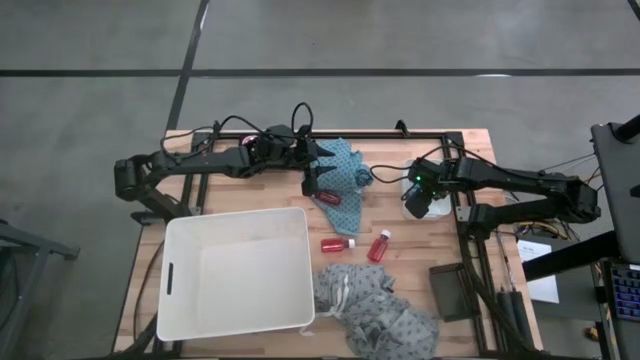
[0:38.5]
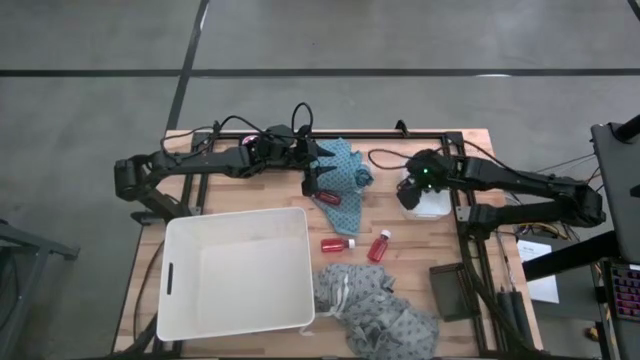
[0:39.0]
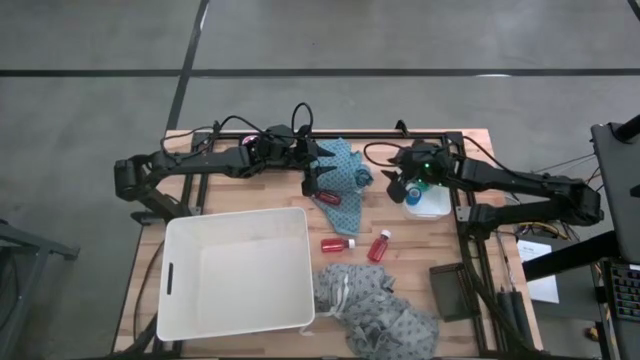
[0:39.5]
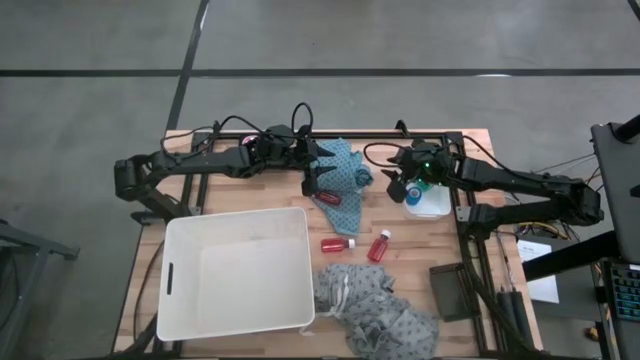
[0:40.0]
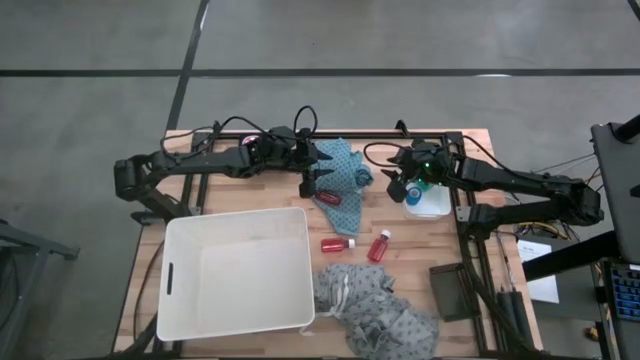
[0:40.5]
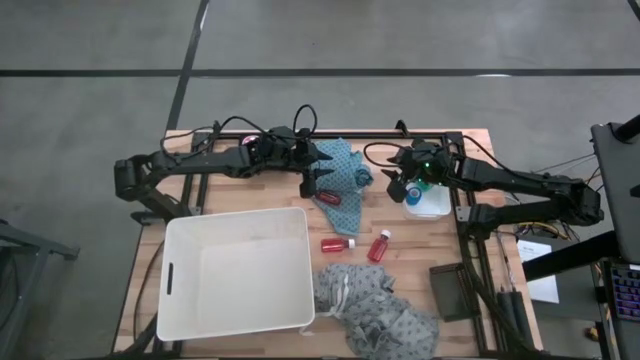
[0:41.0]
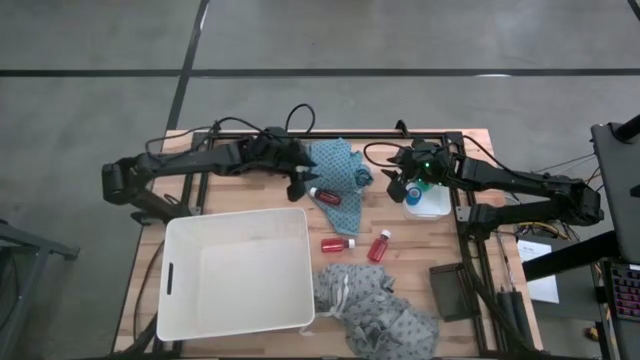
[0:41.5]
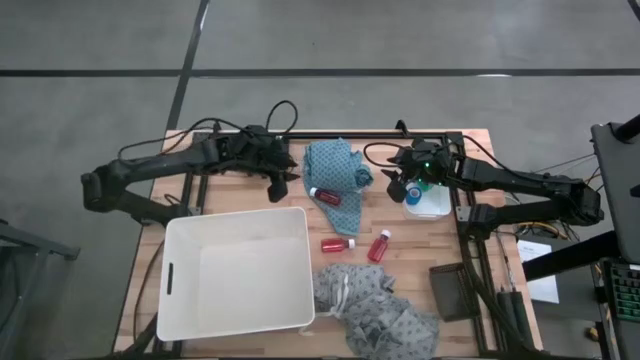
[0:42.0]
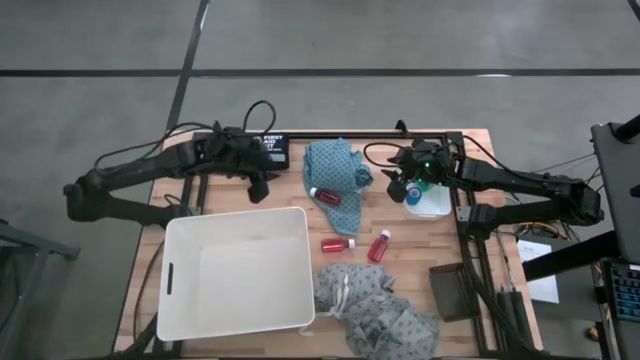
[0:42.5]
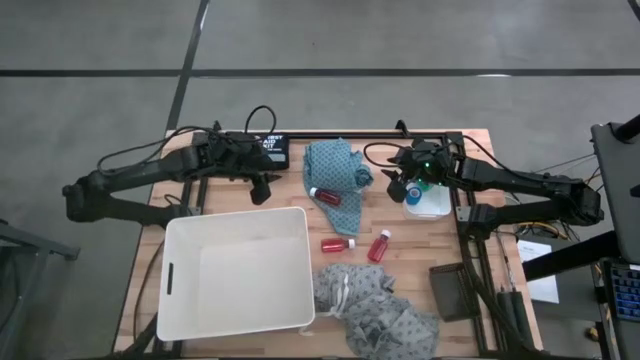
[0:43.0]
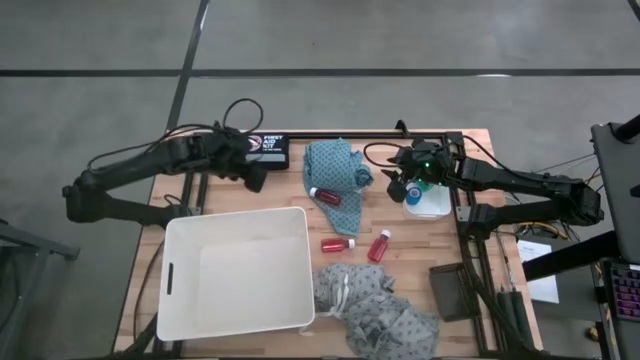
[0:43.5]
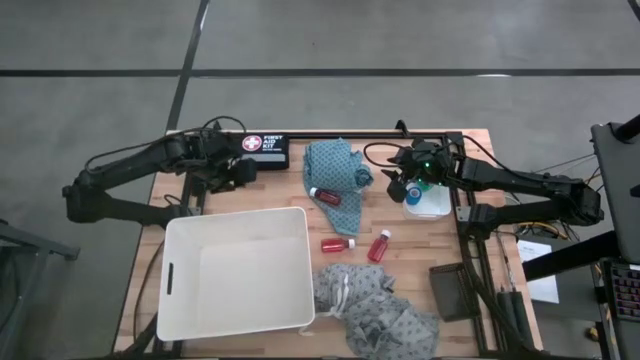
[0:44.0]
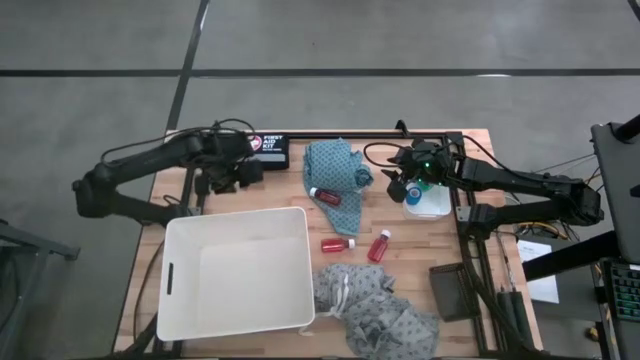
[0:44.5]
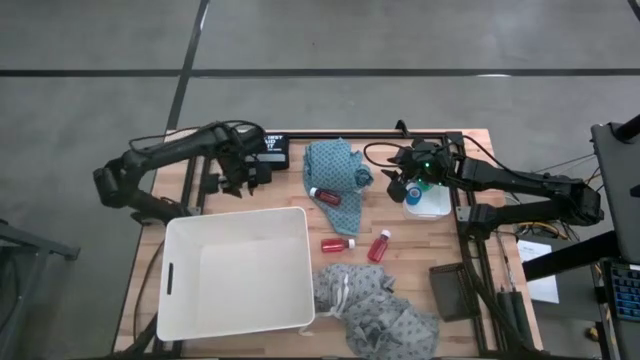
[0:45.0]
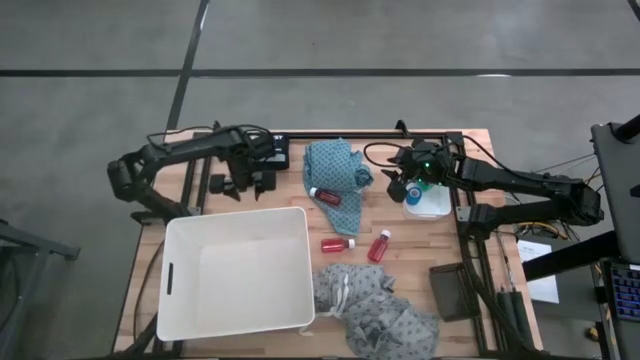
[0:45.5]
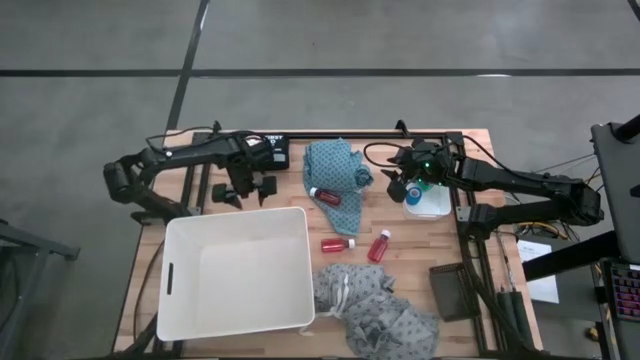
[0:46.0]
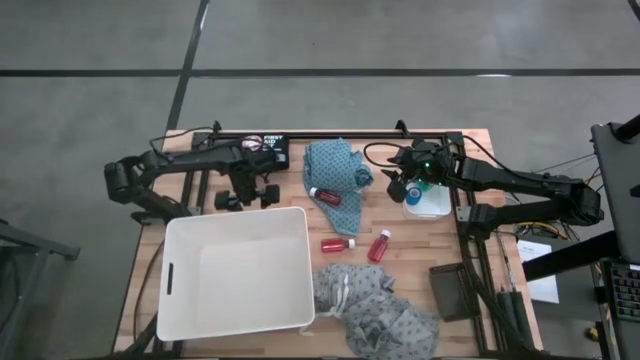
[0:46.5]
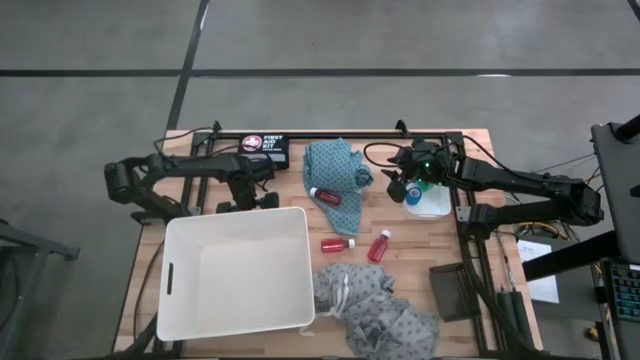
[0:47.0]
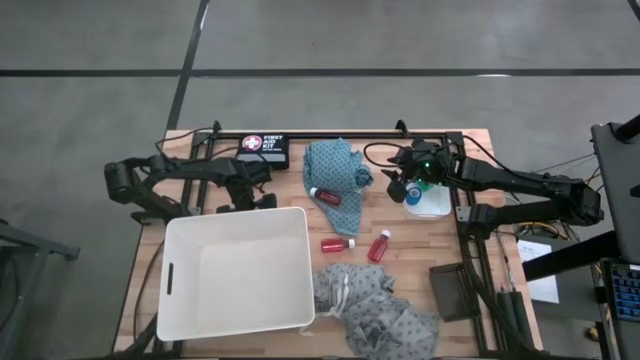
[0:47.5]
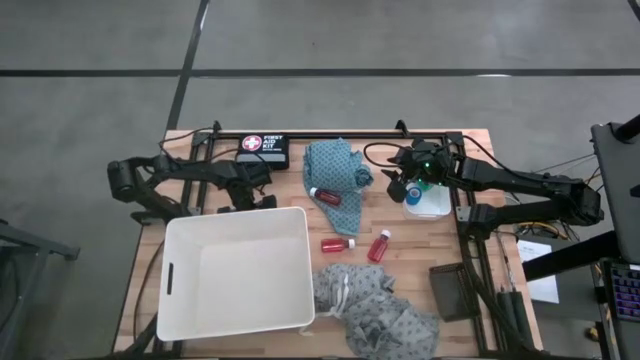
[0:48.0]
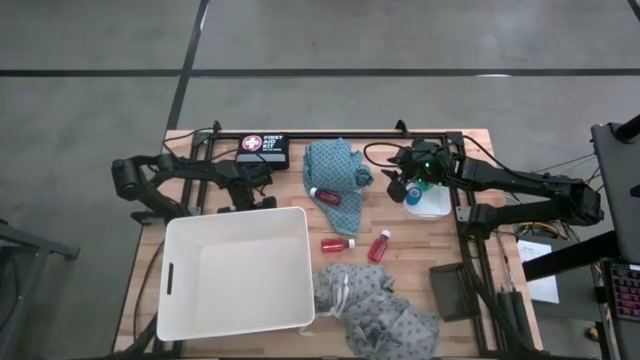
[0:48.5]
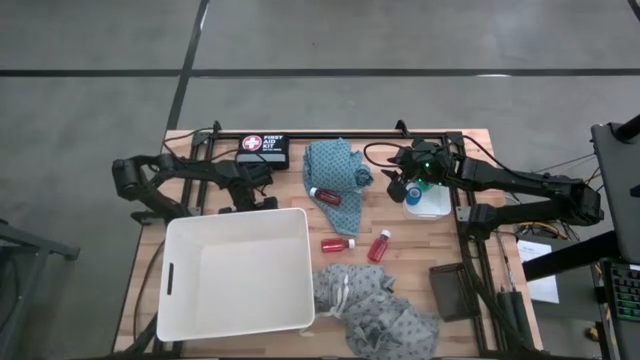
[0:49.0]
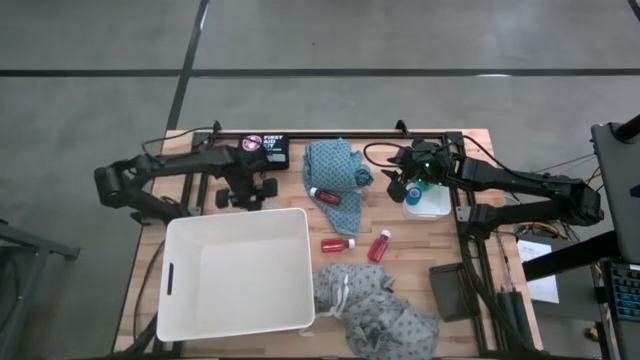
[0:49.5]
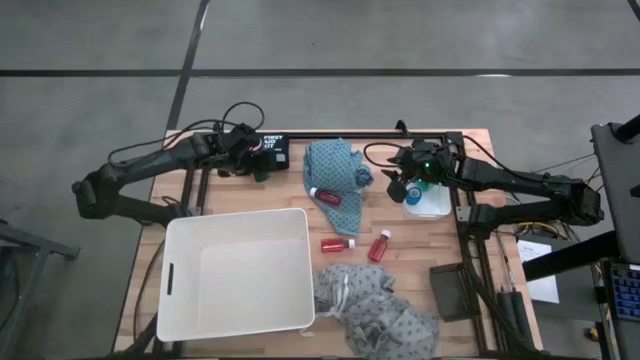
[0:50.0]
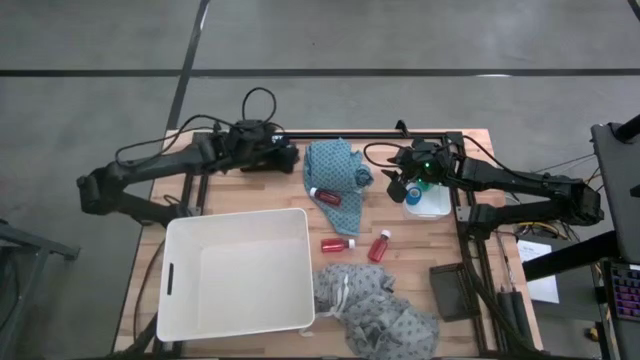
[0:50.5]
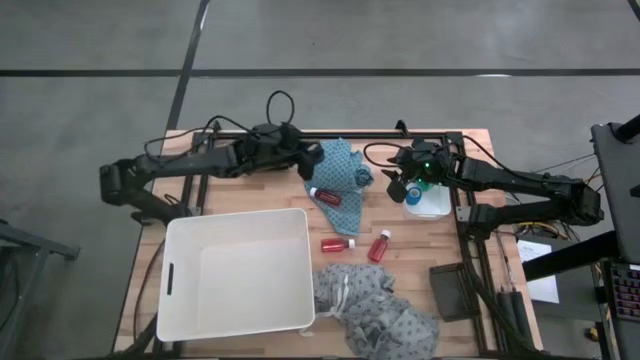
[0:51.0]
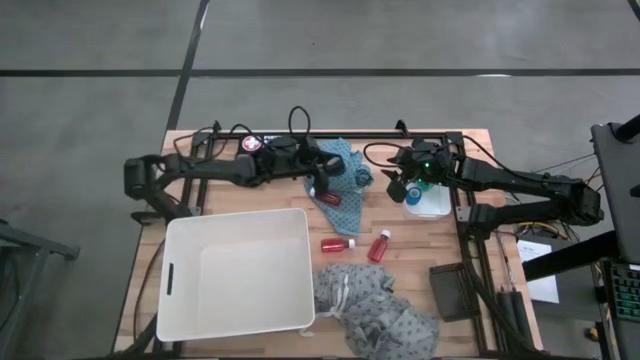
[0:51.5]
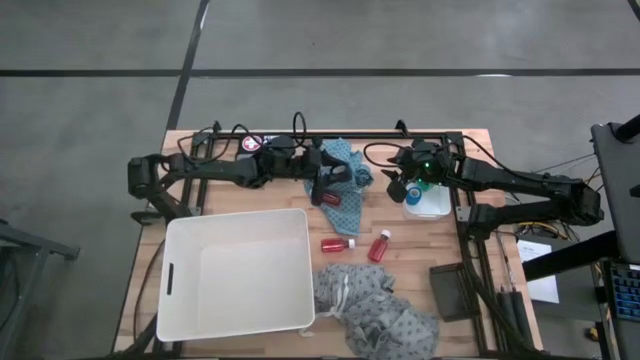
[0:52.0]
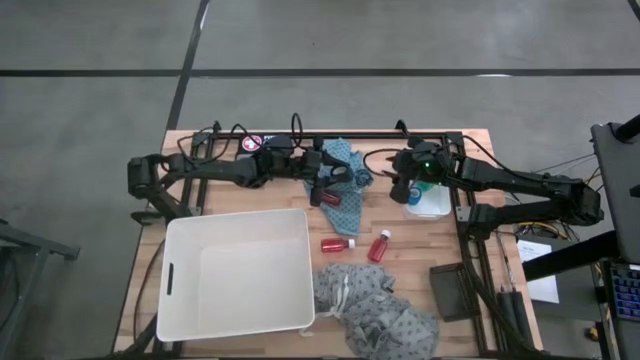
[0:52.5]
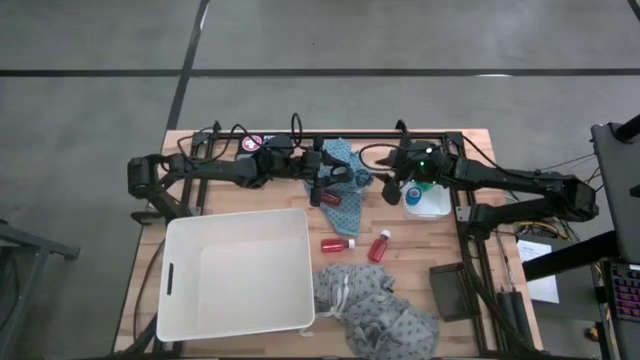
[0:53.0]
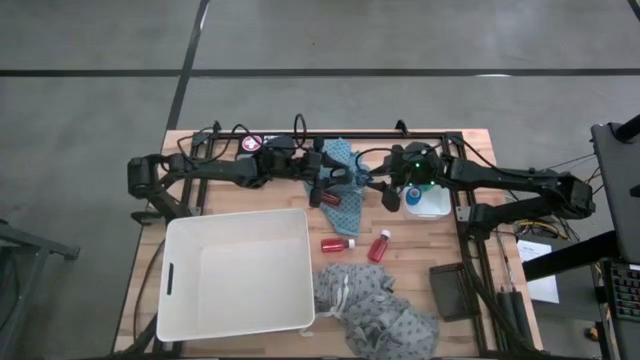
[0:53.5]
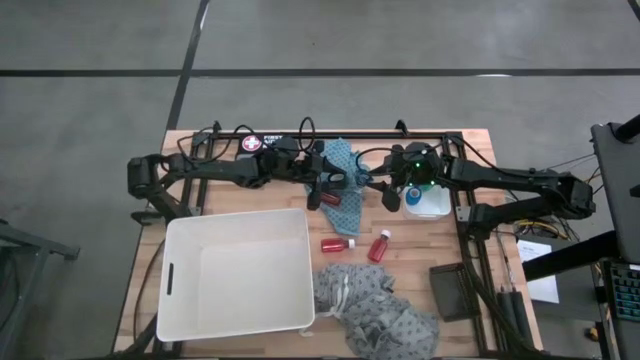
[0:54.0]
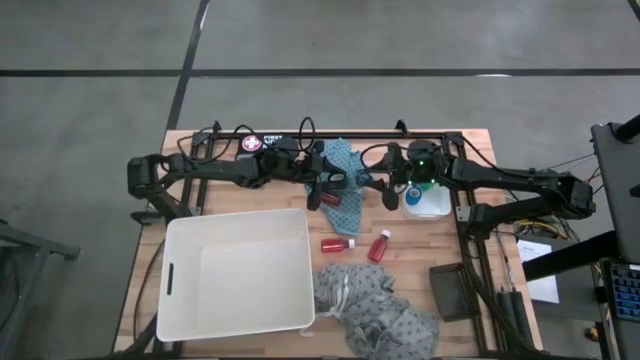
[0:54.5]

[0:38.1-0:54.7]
Task: Pick & Place Medicine items
Put the green bandage into the small white bin

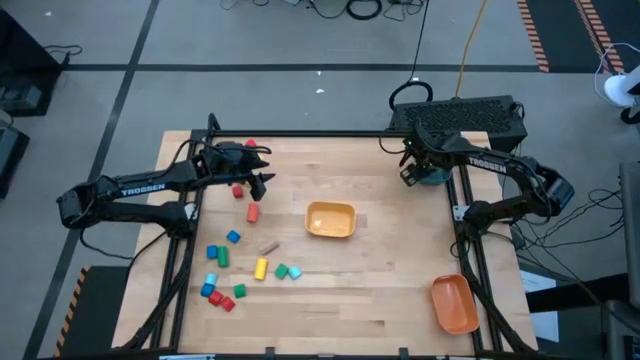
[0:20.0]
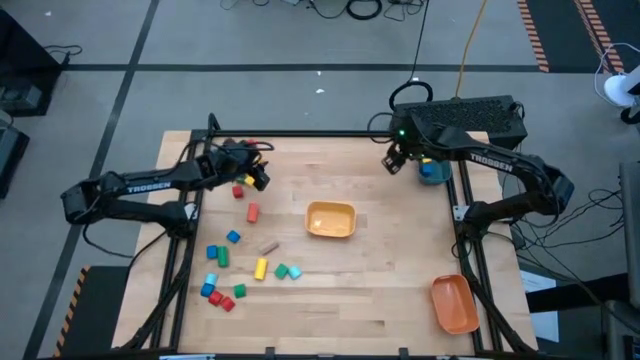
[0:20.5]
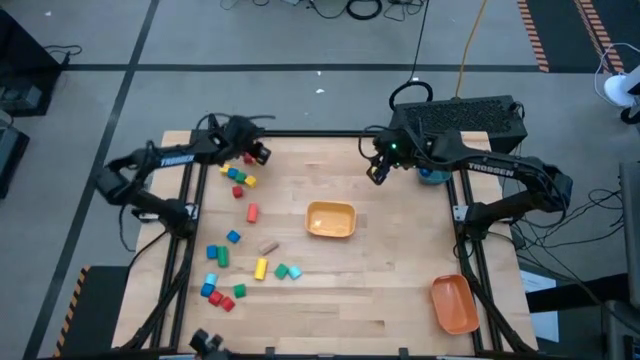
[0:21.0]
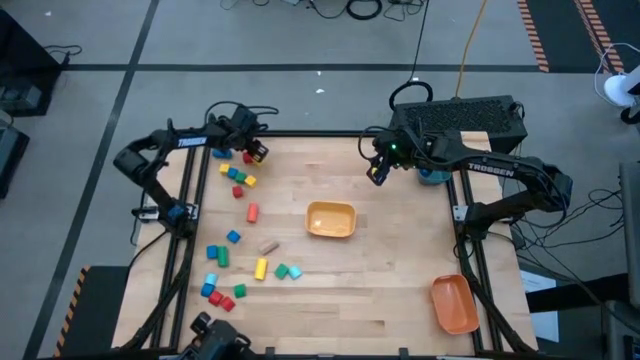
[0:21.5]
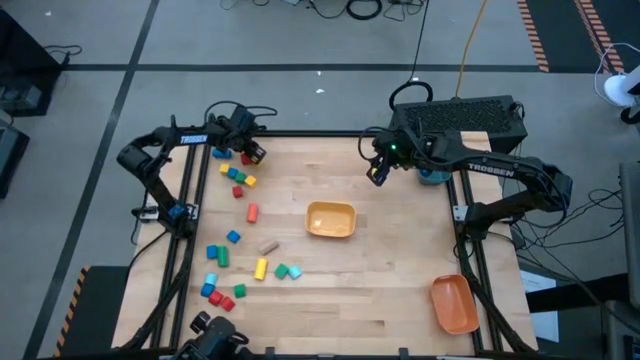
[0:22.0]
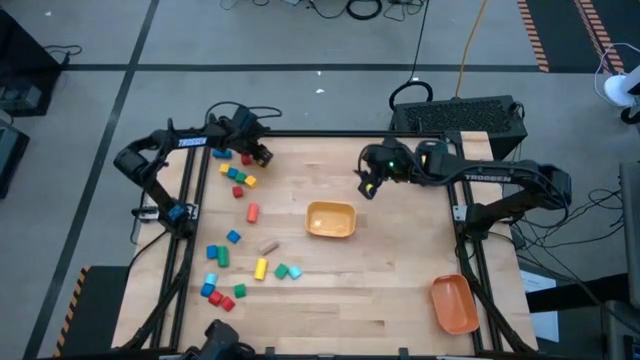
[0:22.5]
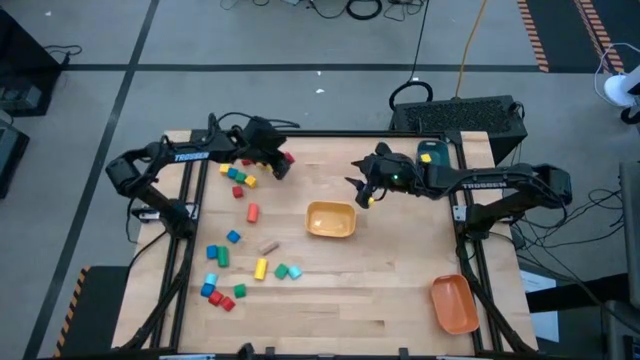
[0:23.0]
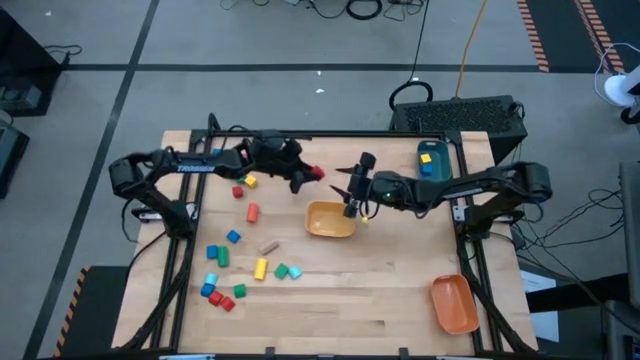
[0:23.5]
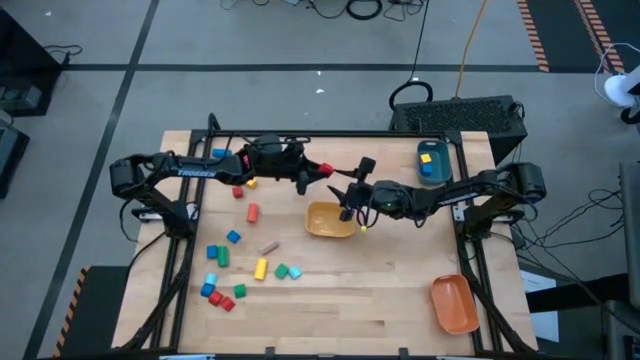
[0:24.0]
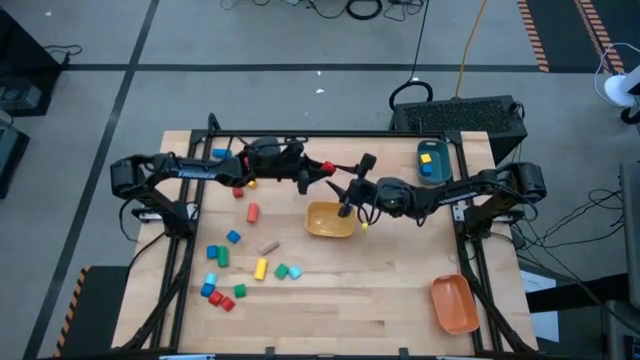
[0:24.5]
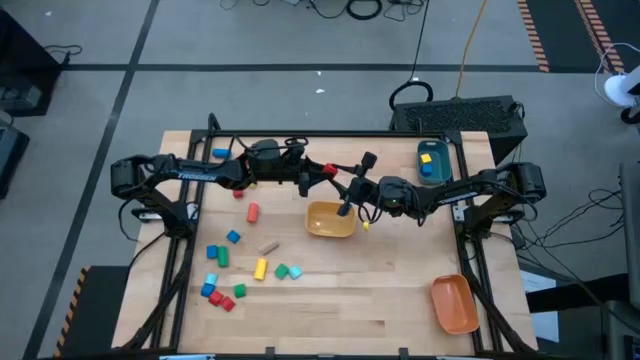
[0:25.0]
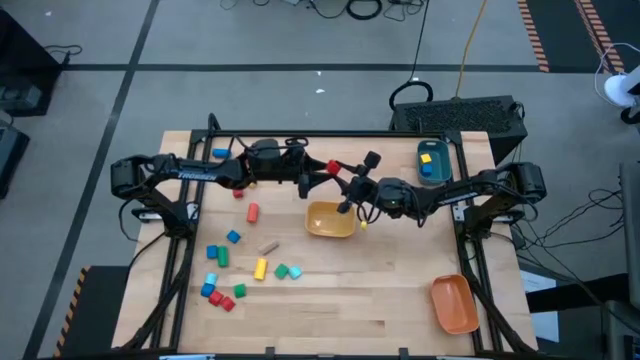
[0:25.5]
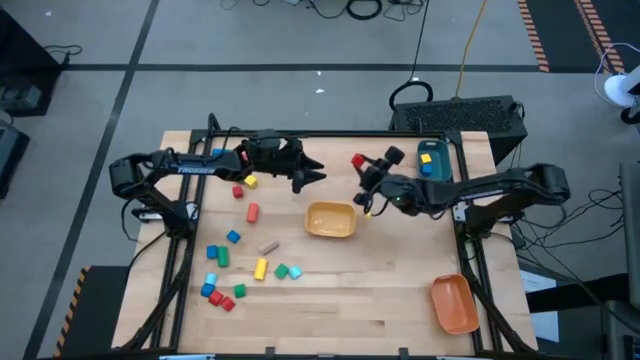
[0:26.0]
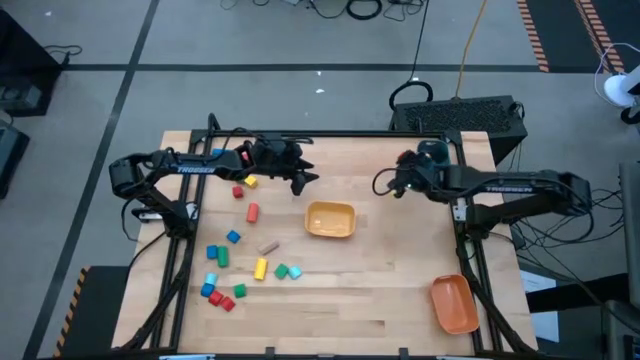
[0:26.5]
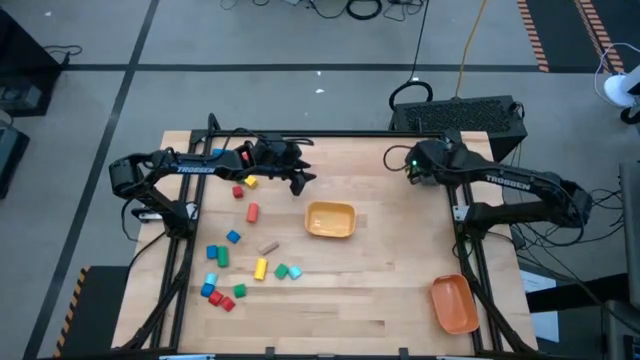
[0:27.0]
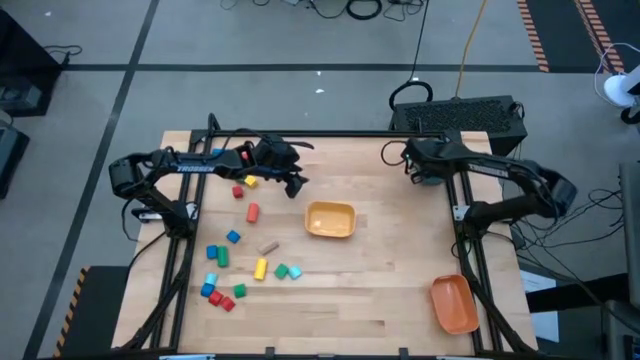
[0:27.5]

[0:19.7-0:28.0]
Task: Sort blocks by size
Put the red square block into the blue bin
